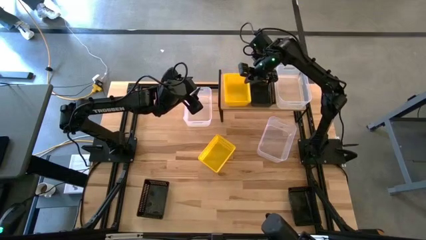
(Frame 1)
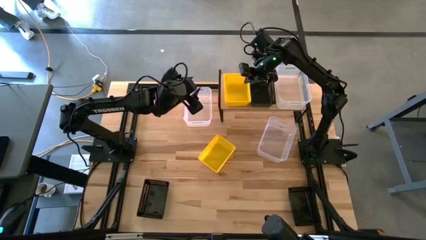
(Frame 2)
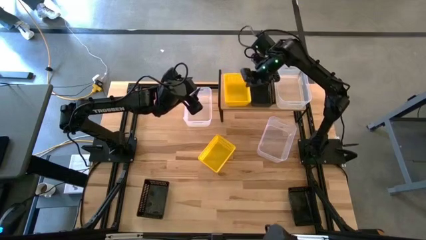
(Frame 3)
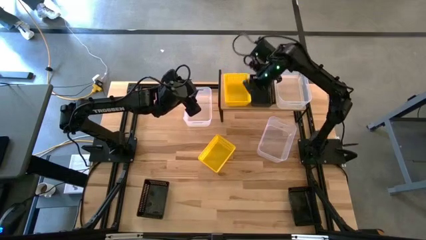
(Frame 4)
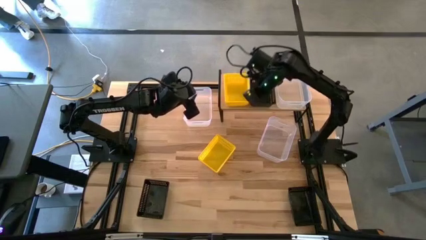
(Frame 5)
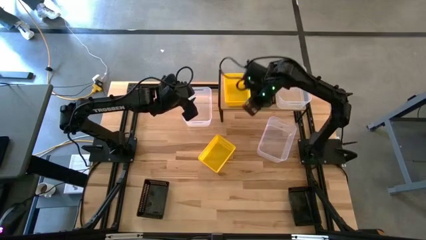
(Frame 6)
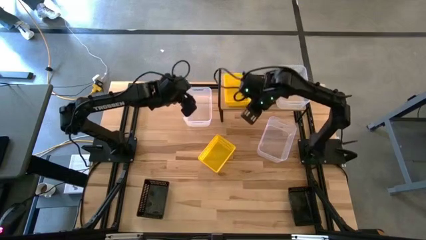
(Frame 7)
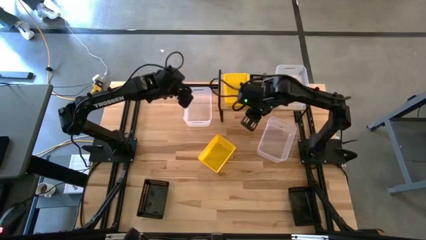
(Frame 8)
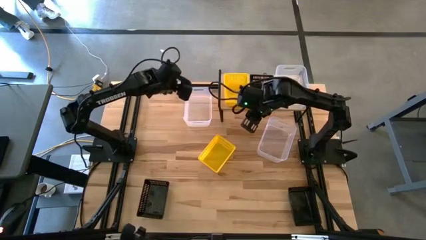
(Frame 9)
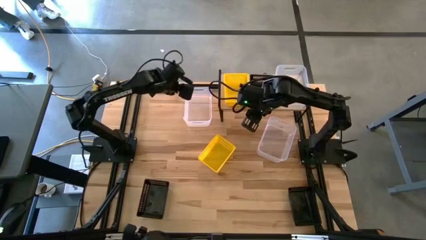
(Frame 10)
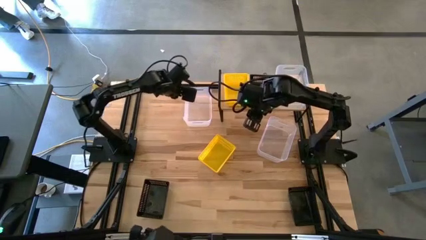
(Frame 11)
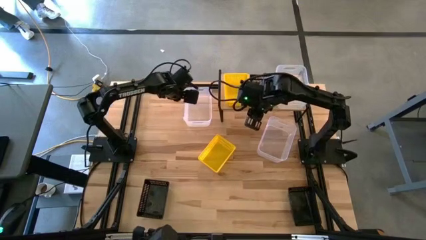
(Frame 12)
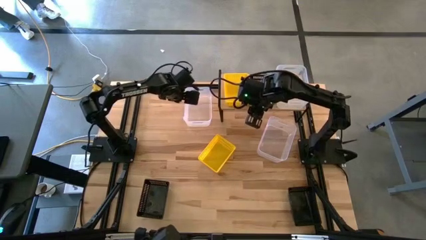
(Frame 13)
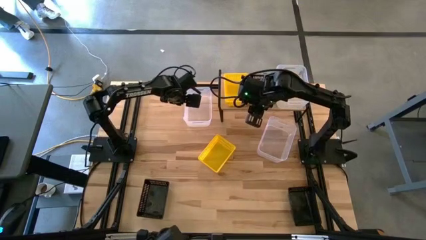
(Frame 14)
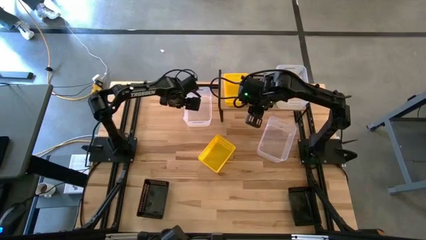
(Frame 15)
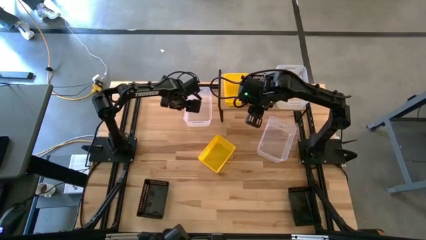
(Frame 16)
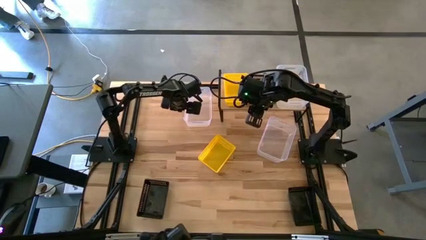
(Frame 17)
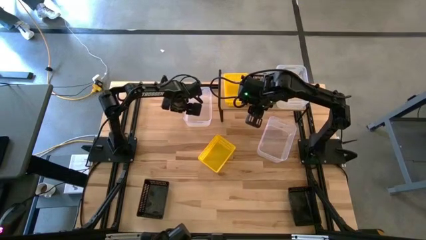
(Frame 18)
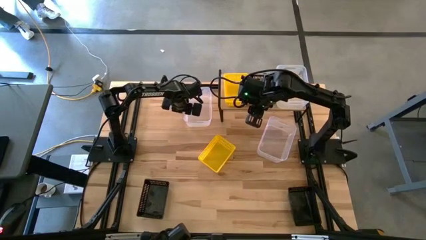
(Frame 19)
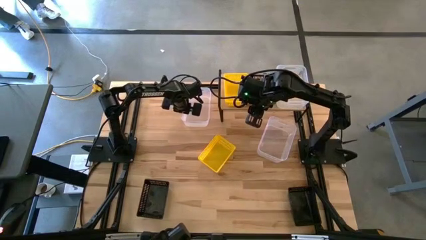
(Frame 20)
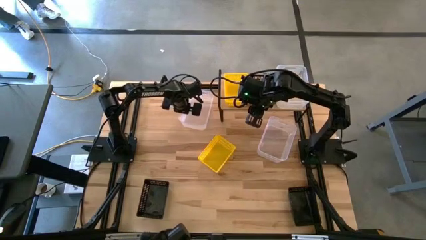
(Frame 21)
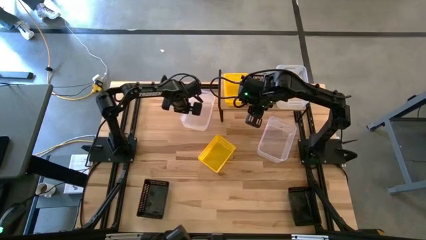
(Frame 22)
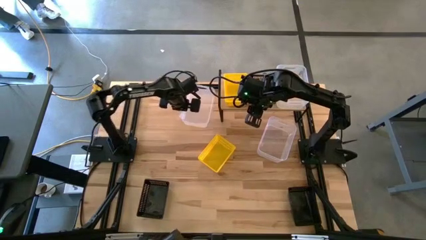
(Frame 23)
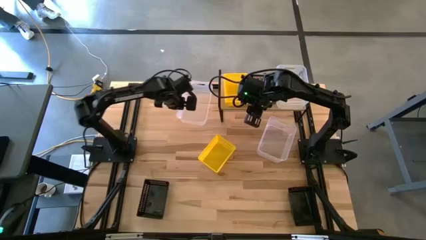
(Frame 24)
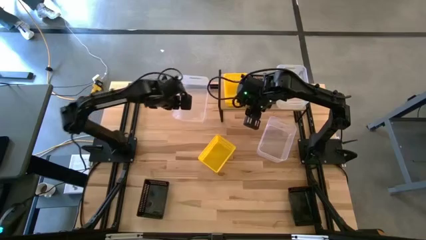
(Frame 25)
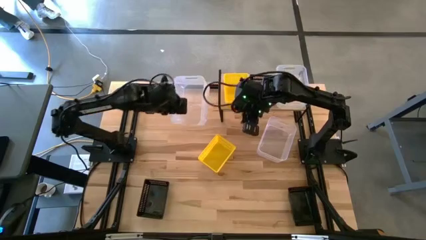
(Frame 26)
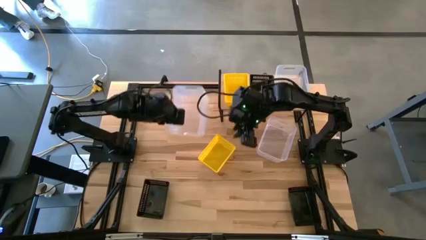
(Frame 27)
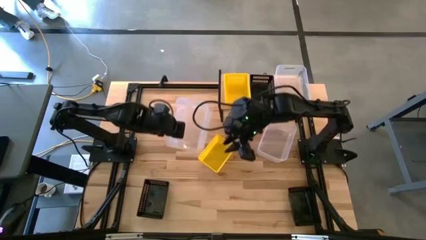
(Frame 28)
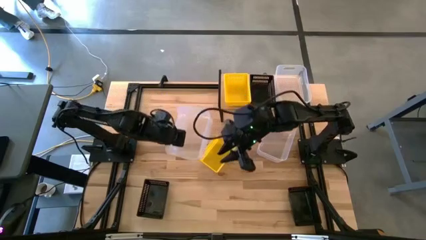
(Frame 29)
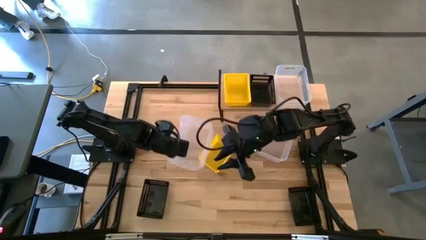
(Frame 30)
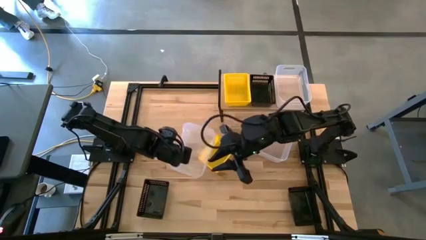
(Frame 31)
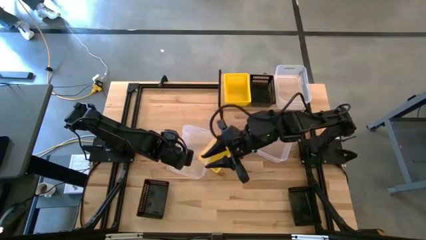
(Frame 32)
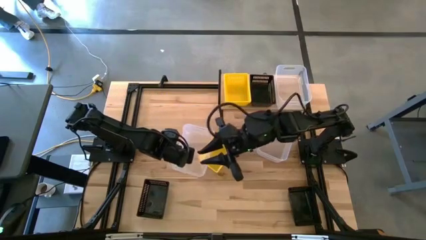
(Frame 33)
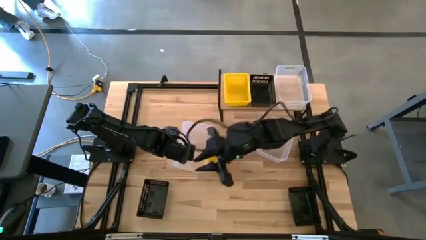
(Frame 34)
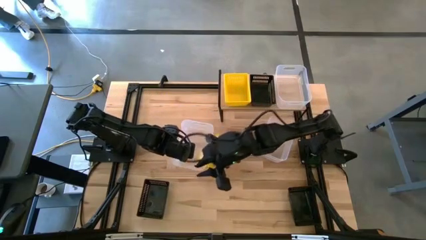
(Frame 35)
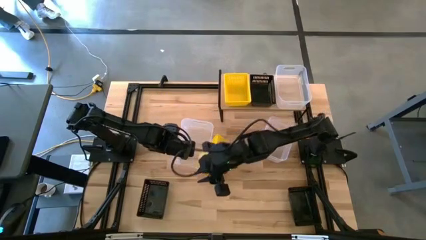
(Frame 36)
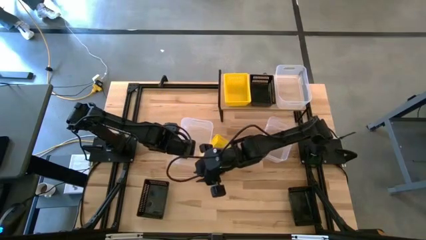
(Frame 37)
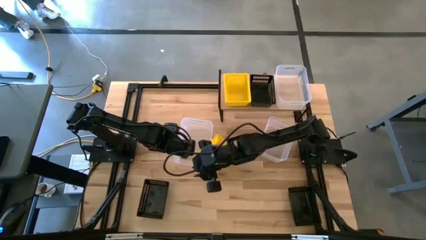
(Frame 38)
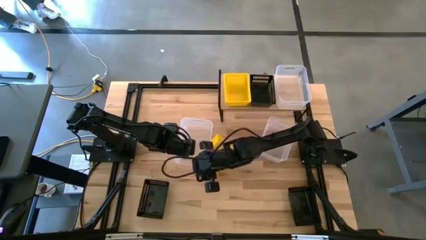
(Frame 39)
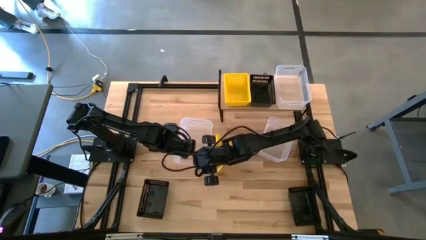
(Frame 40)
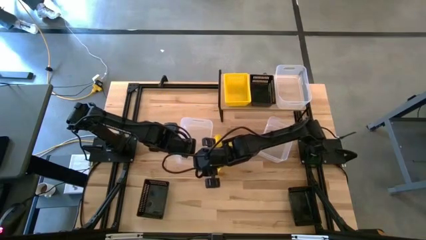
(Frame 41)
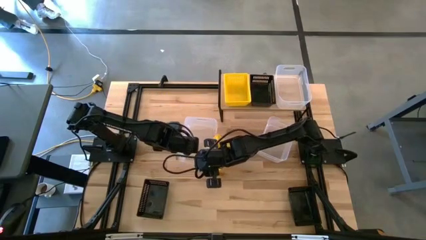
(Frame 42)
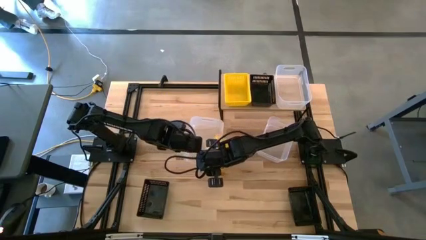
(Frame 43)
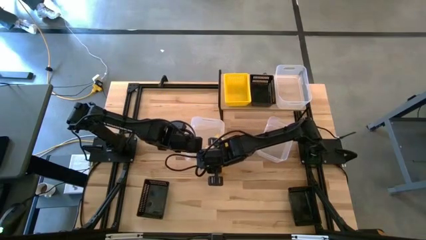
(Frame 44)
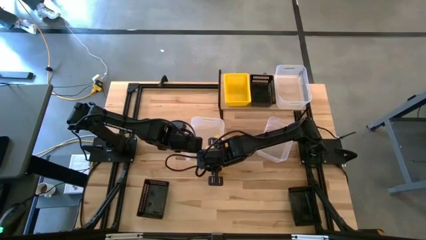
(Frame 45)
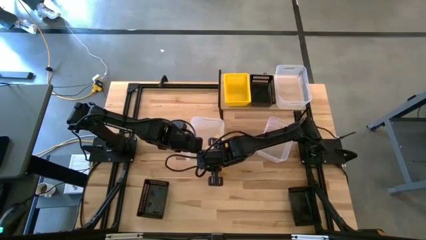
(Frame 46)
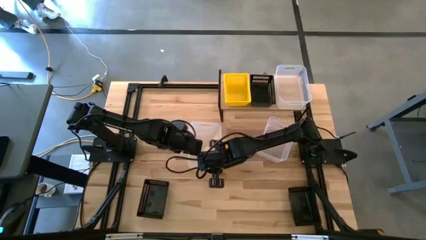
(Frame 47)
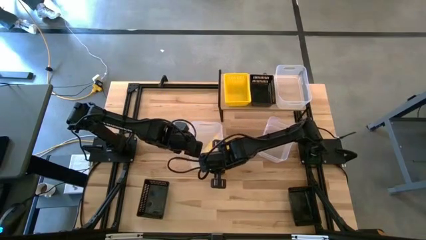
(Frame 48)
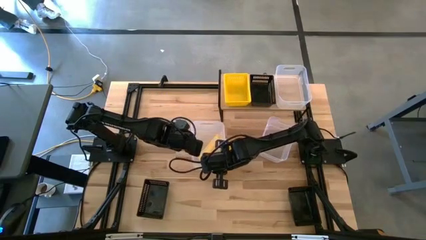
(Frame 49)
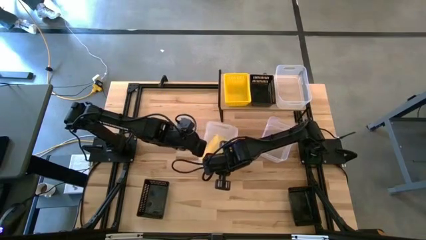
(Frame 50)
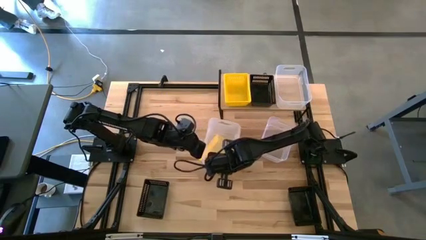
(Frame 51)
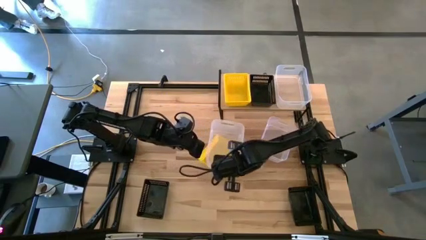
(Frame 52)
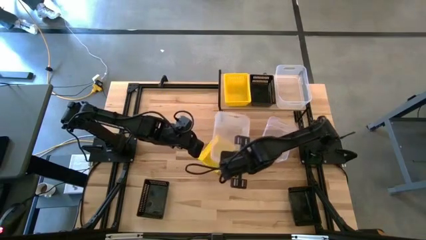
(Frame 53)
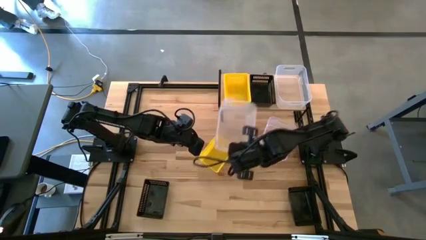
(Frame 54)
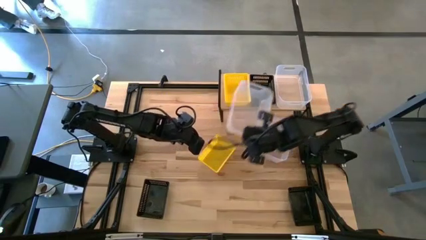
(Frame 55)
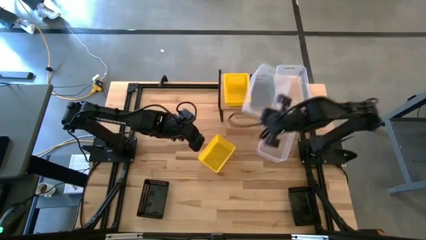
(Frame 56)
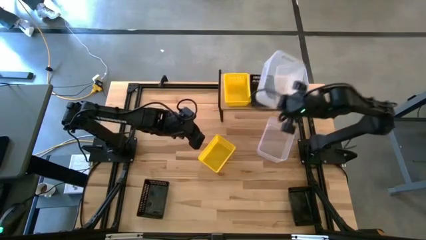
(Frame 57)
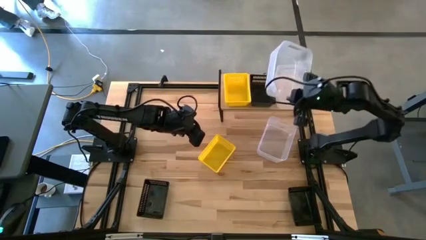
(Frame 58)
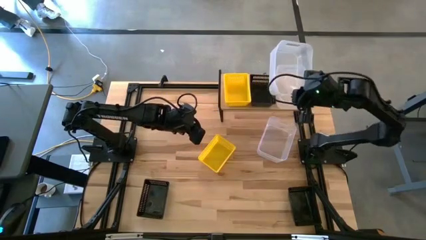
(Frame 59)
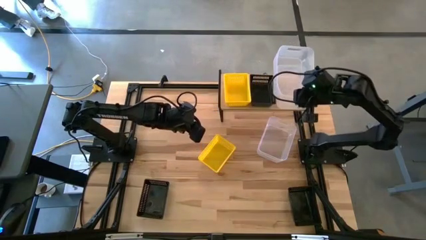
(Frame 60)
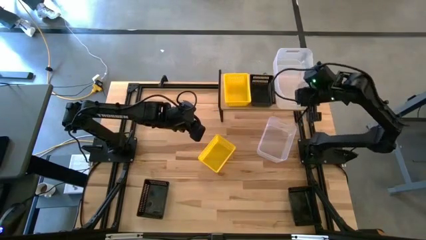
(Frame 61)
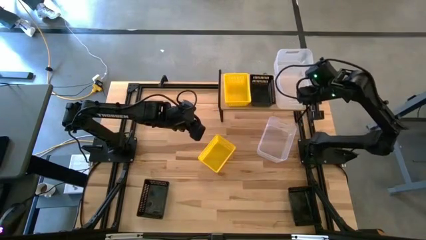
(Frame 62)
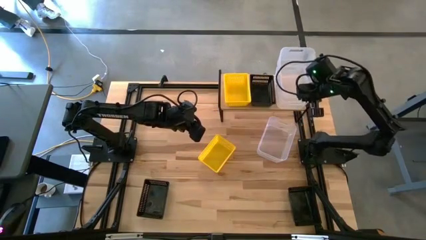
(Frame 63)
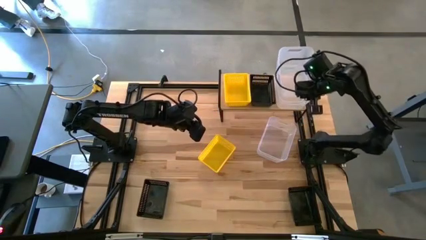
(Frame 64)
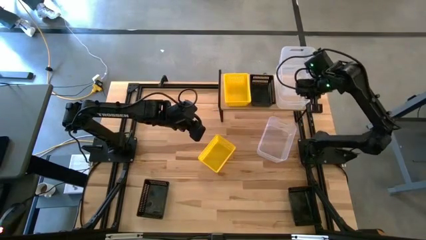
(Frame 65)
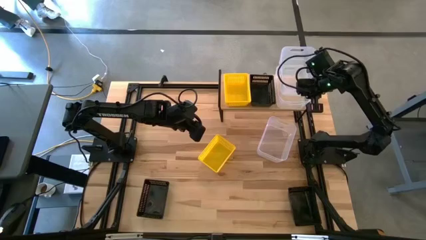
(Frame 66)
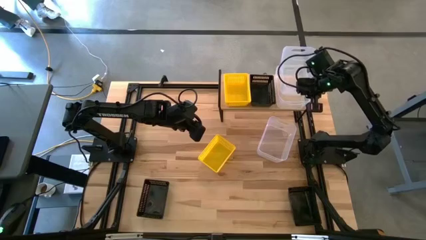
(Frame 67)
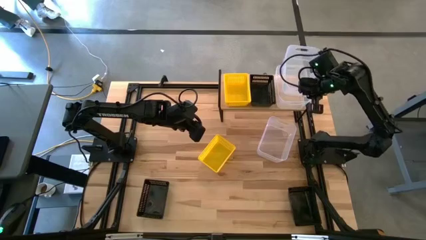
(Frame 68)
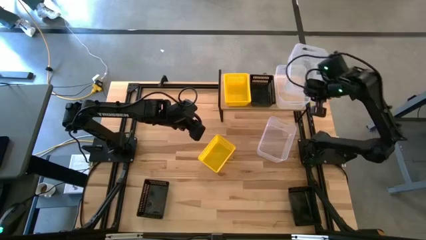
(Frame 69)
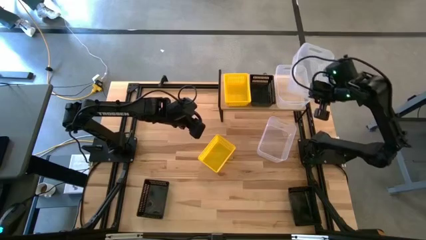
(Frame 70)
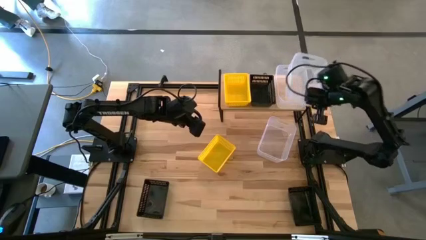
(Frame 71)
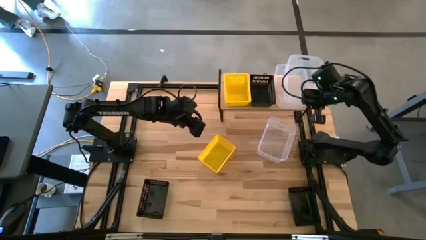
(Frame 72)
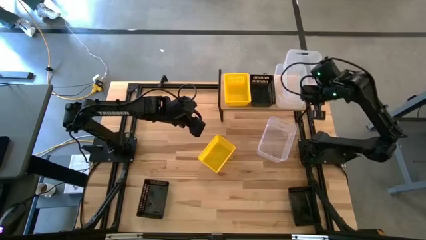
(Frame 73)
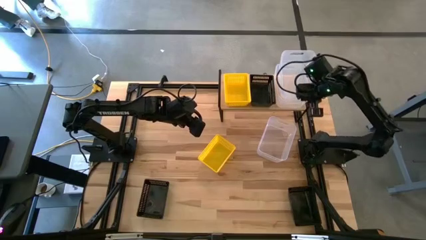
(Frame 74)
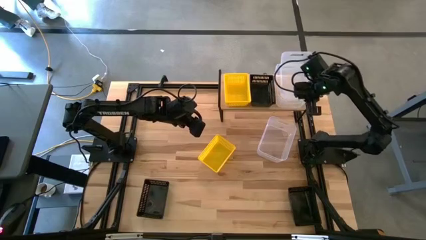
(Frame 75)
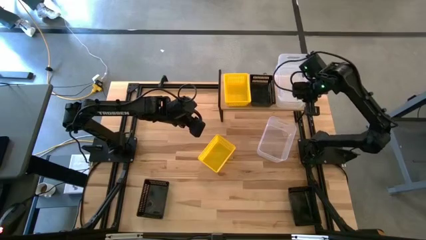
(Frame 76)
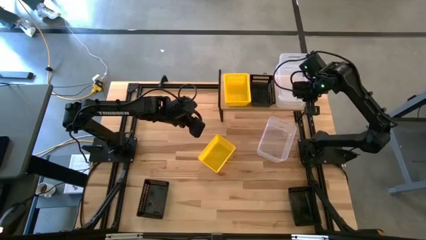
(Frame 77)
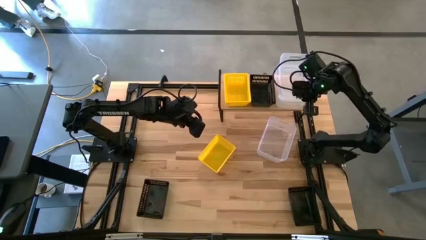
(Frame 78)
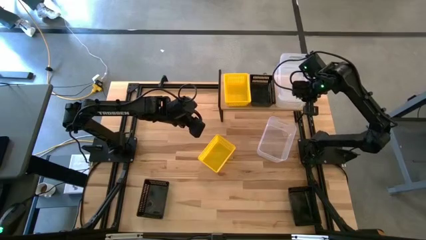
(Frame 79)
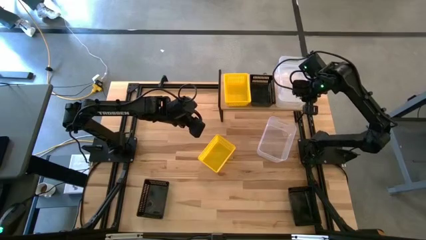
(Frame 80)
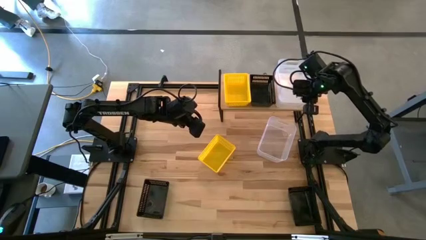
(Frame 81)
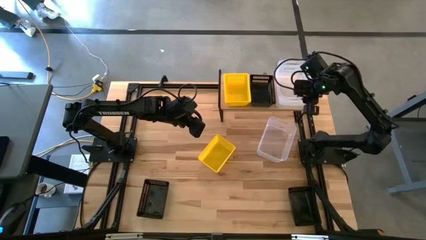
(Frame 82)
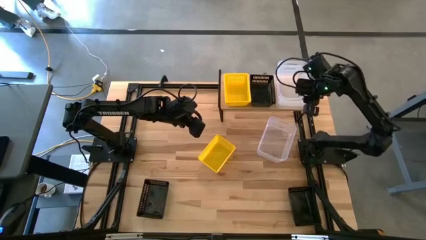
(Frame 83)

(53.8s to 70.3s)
Task: Stack baskets on shelf by color
Stack the top transparent bin on top of the other transparent bin on the shelf
